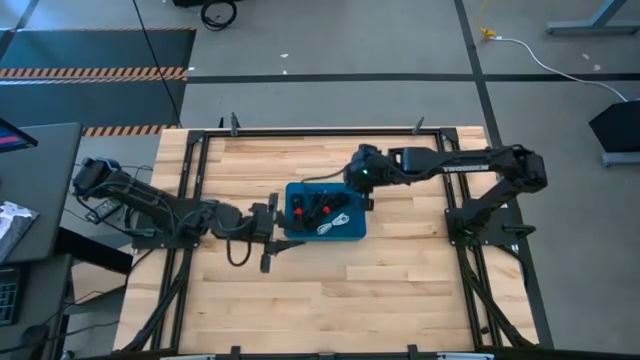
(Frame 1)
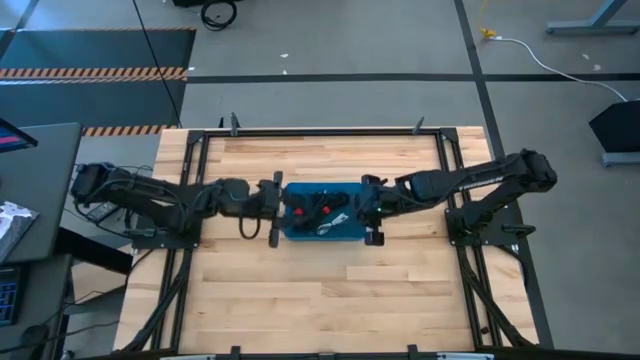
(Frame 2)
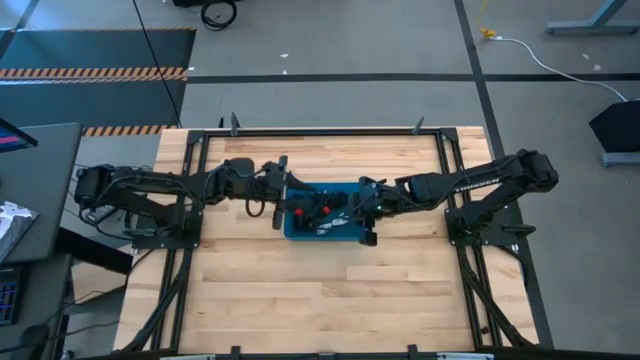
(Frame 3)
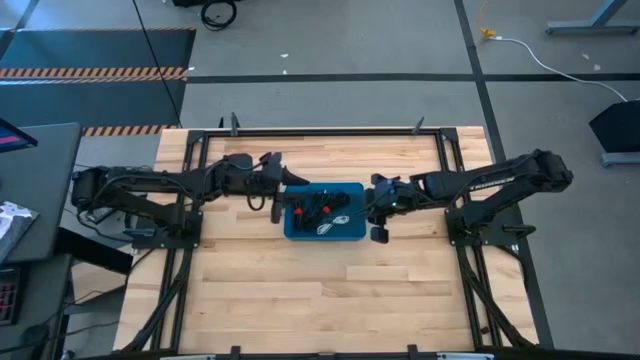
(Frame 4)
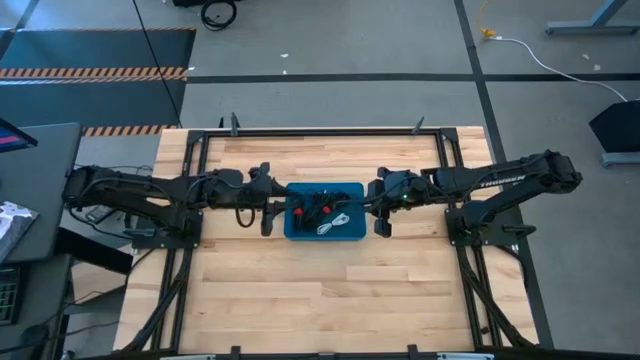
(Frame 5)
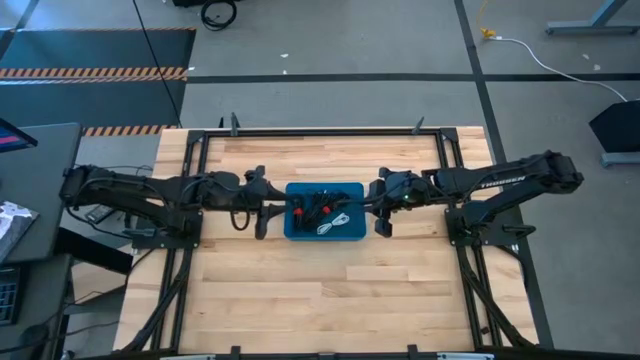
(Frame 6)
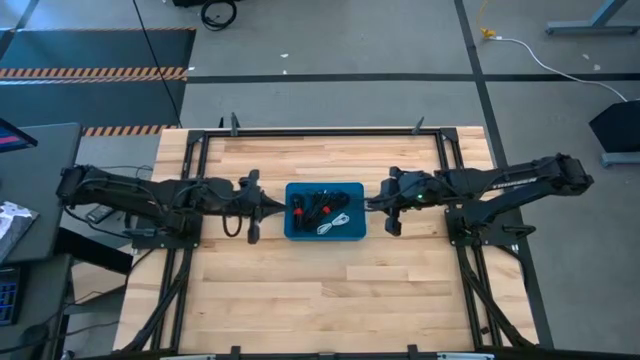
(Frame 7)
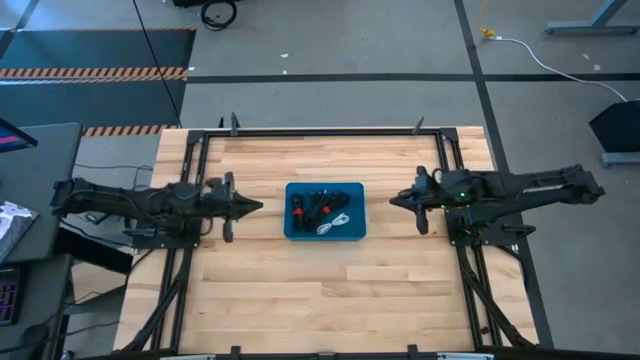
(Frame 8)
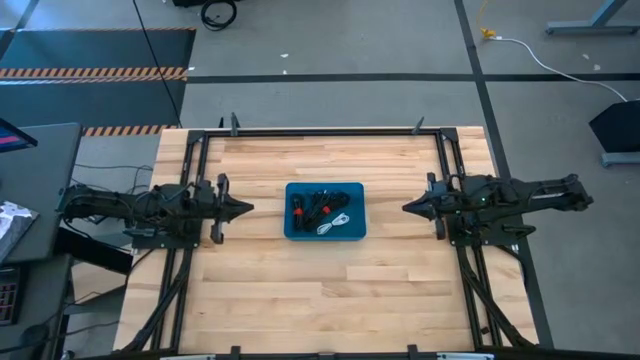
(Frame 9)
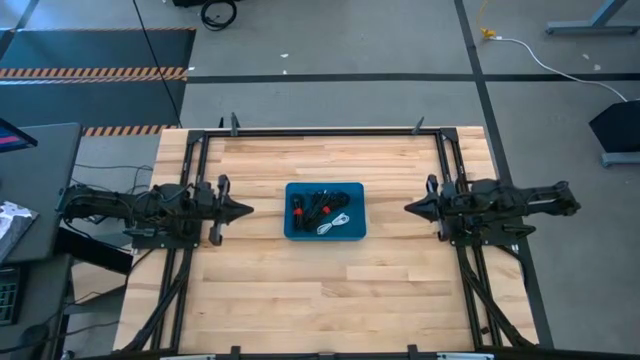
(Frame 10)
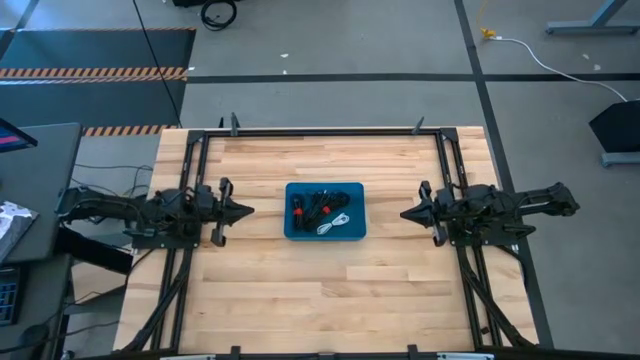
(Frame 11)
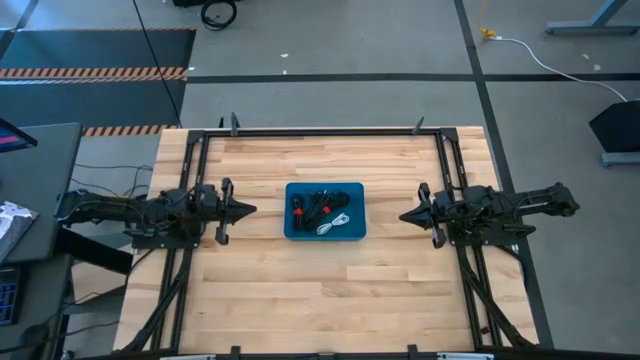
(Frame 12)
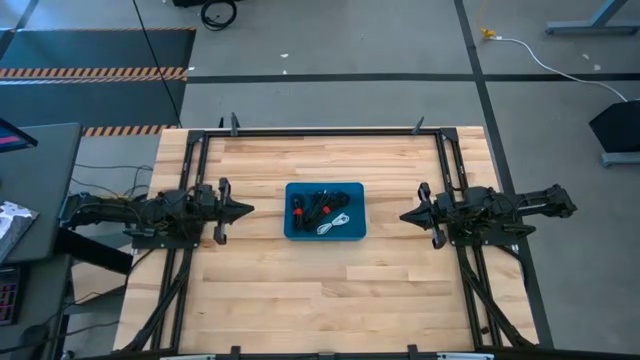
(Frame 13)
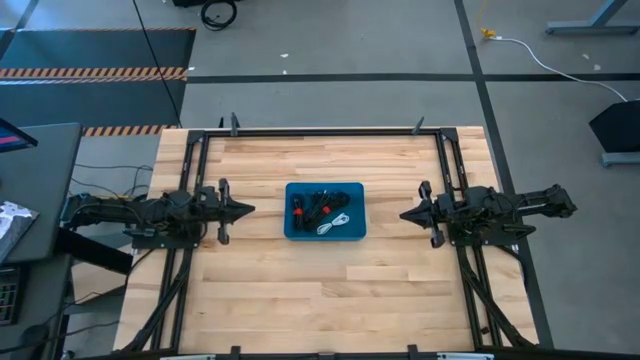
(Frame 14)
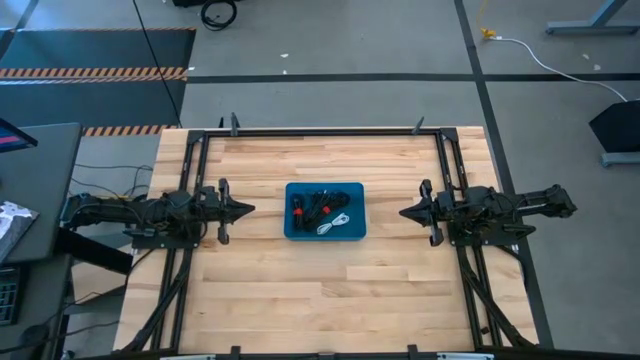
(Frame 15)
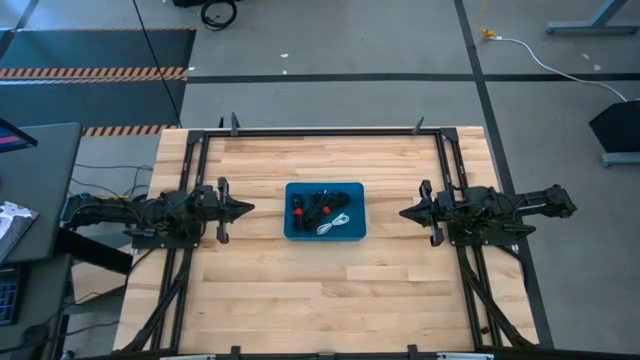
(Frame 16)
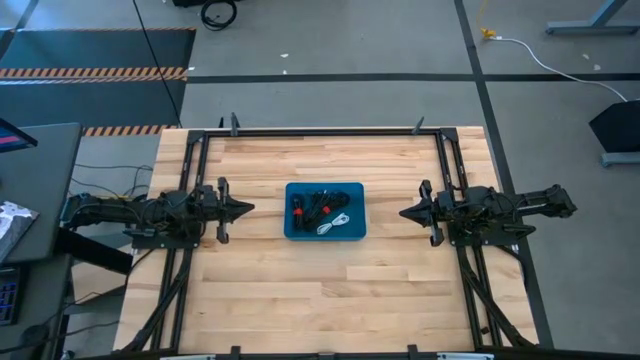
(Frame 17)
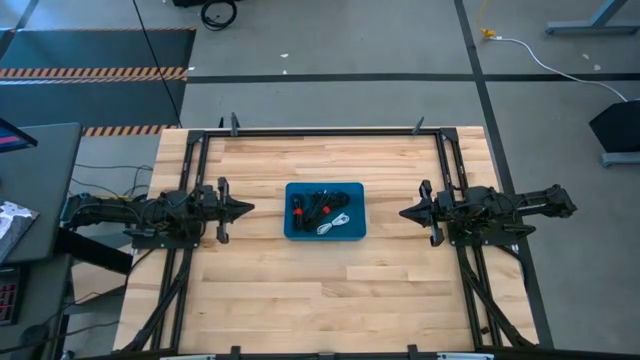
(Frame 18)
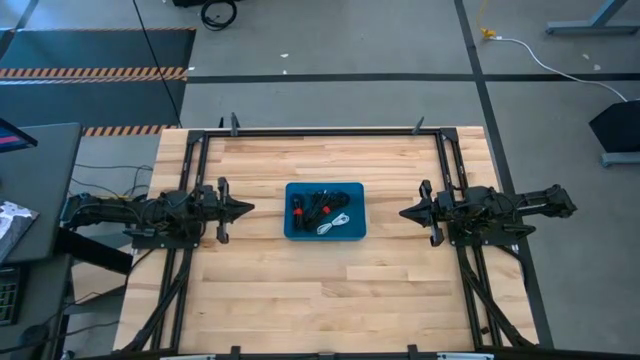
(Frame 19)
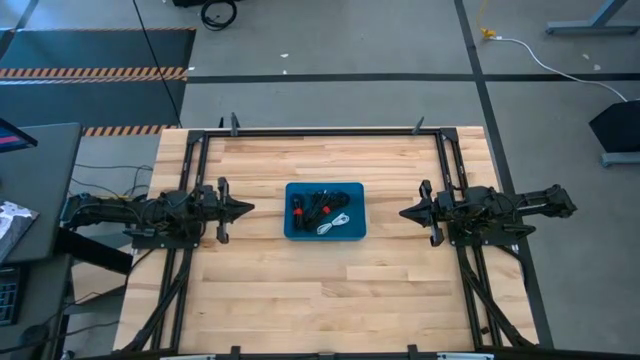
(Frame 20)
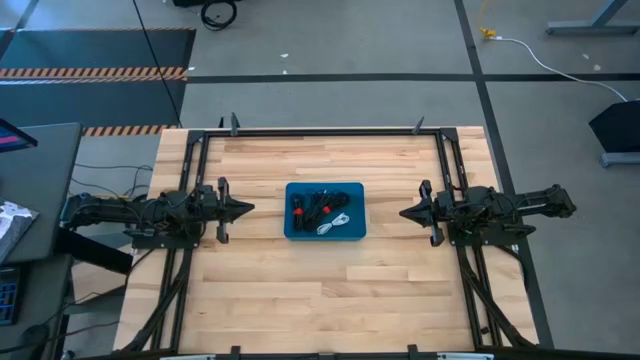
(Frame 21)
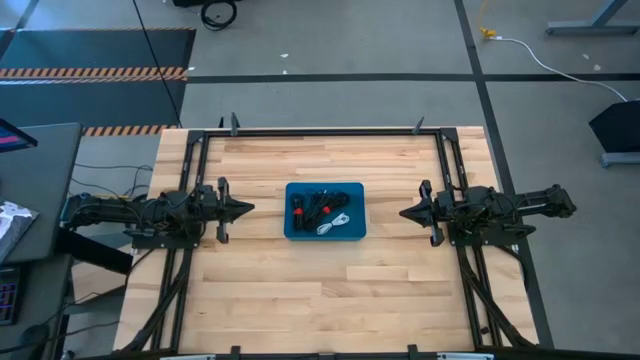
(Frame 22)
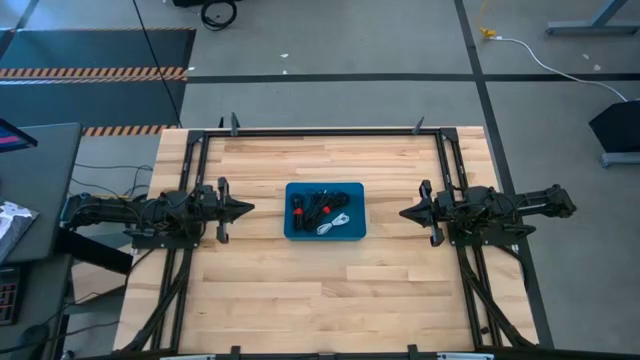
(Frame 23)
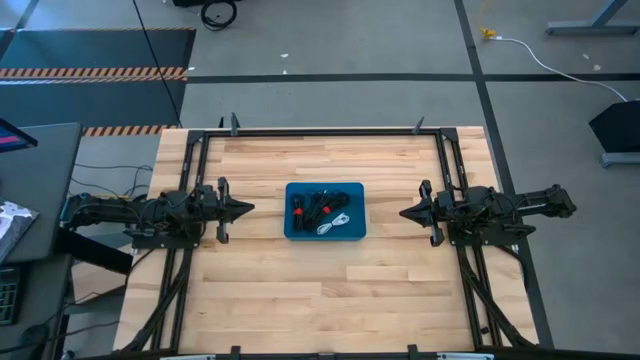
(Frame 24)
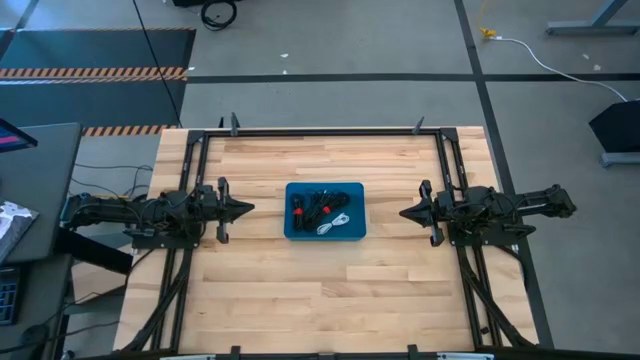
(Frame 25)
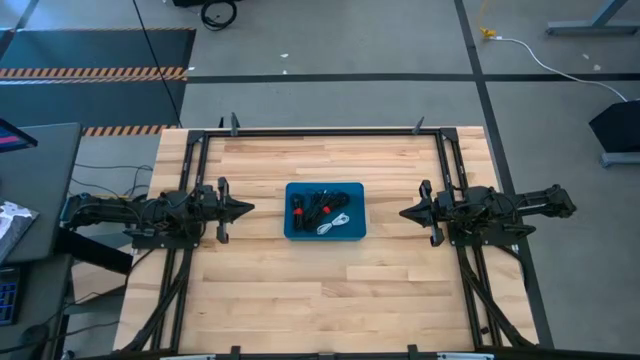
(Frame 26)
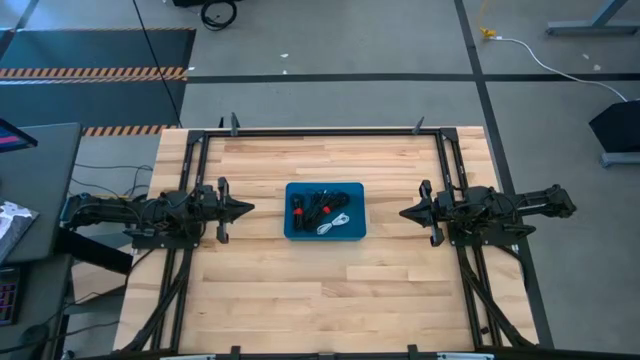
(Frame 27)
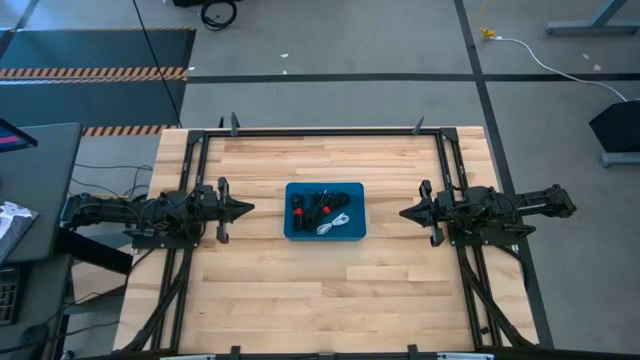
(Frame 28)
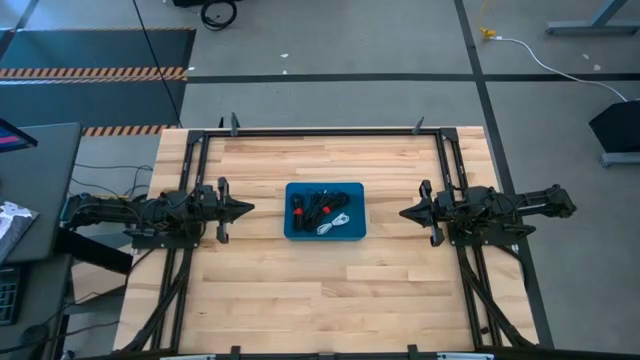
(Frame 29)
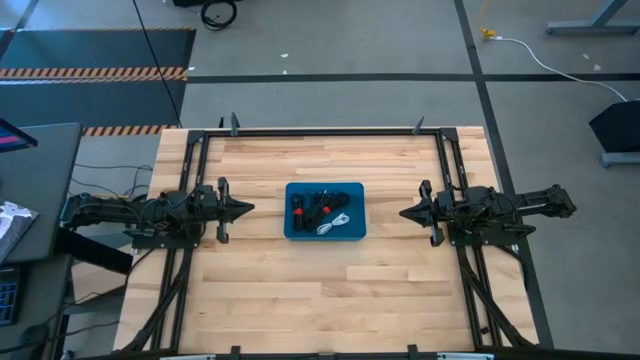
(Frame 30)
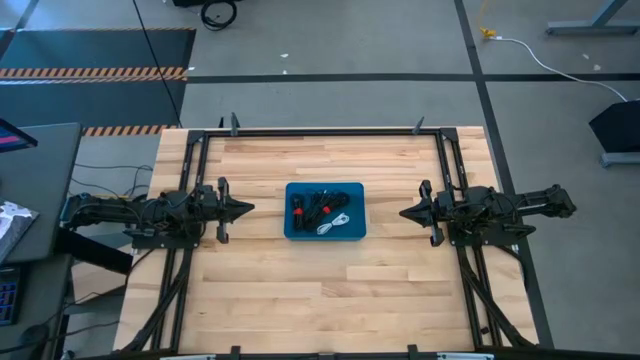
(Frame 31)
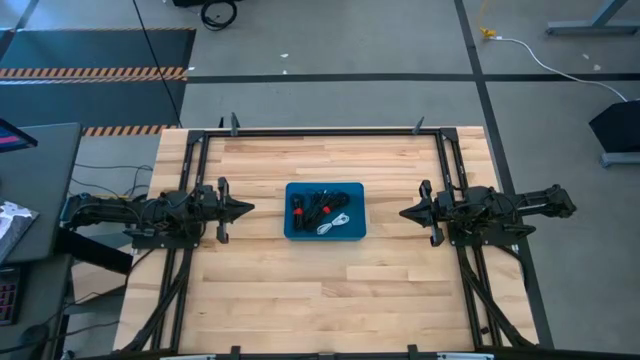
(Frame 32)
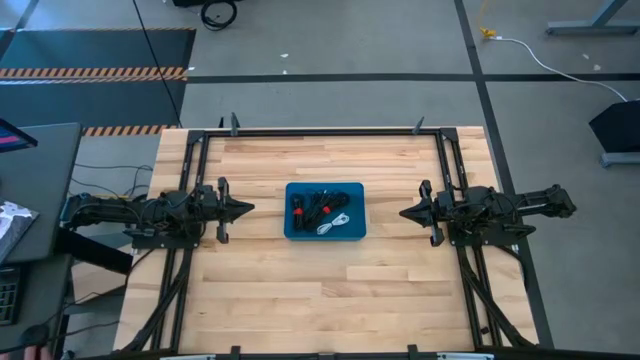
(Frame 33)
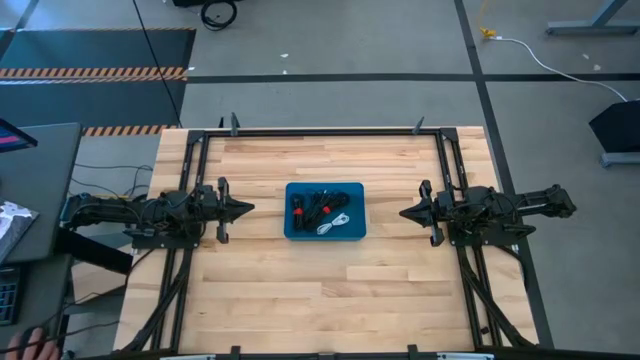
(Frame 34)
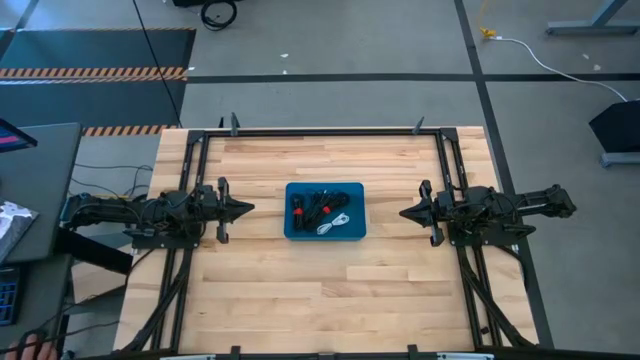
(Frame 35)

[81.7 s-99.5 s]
Task: Pick and place USB-C Cables
Return to Home Position

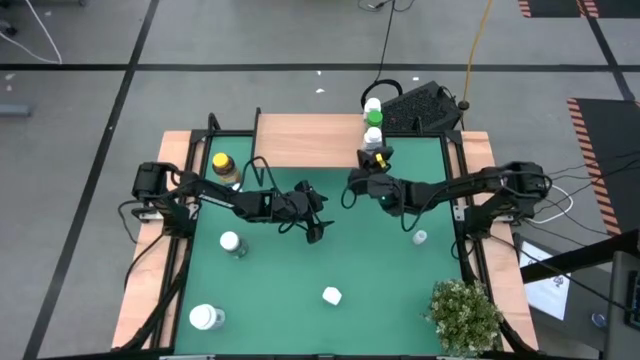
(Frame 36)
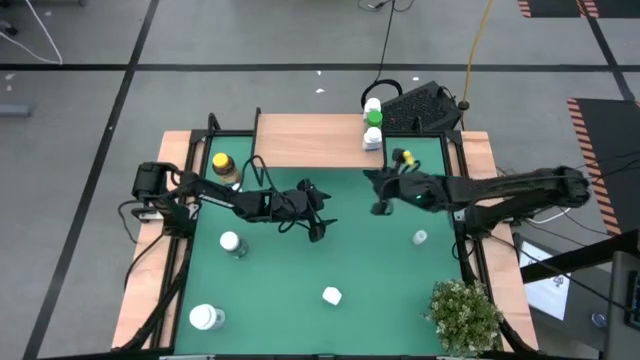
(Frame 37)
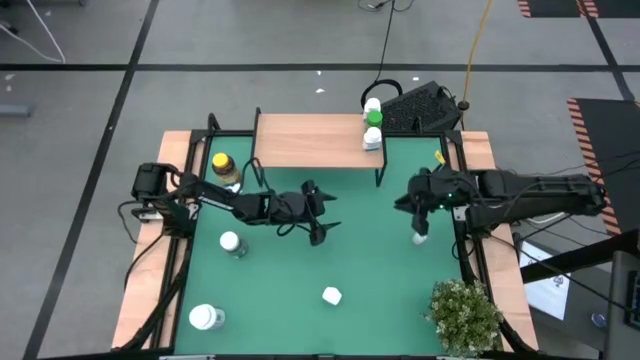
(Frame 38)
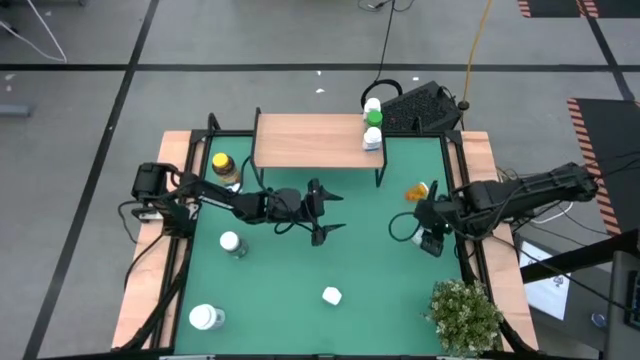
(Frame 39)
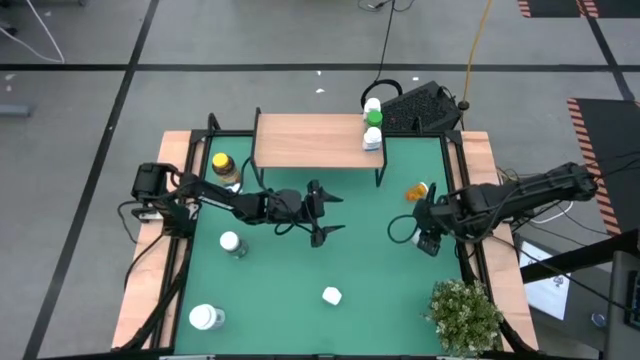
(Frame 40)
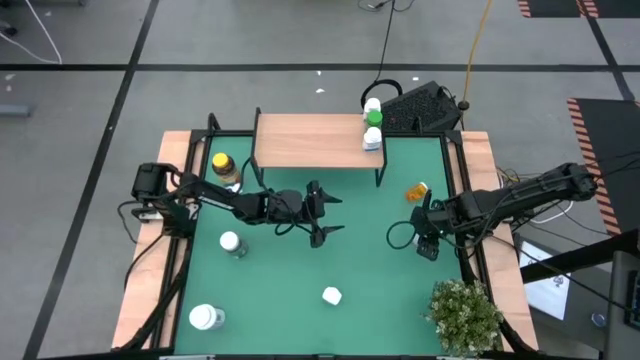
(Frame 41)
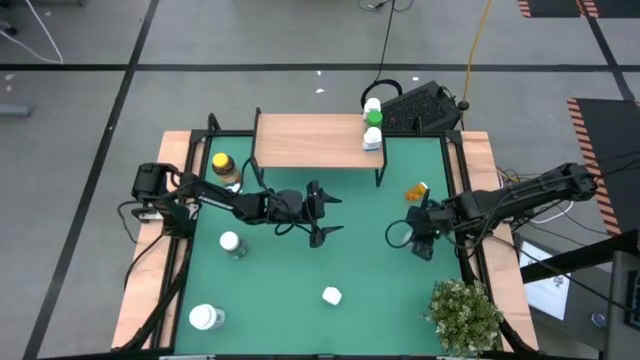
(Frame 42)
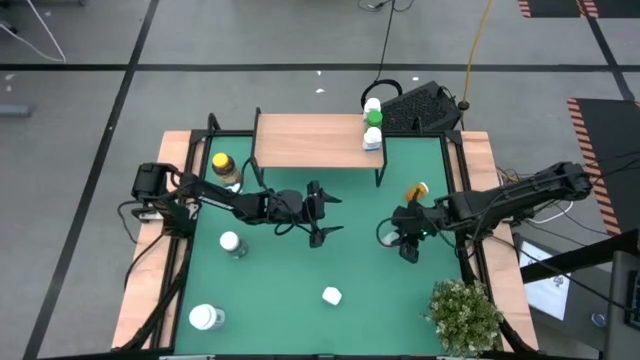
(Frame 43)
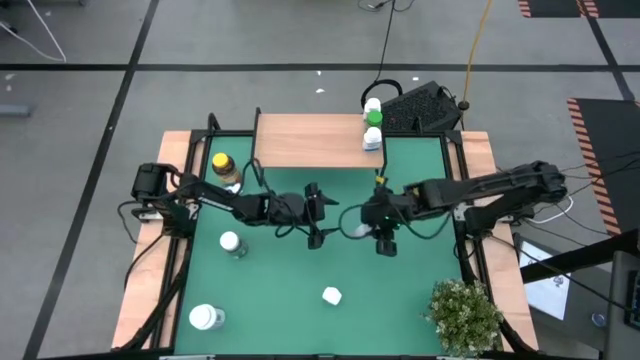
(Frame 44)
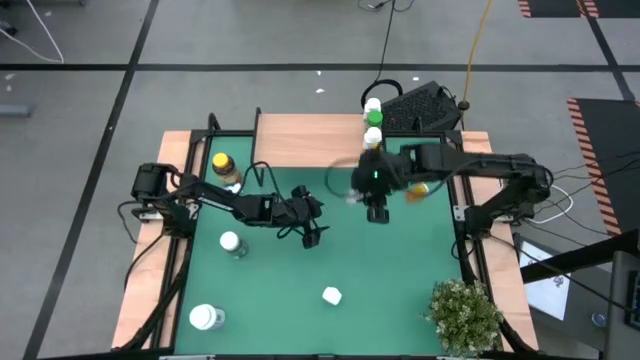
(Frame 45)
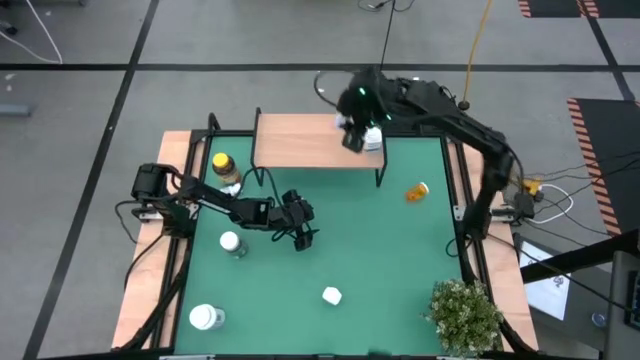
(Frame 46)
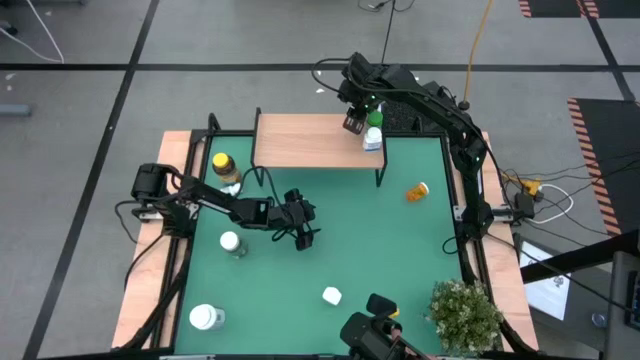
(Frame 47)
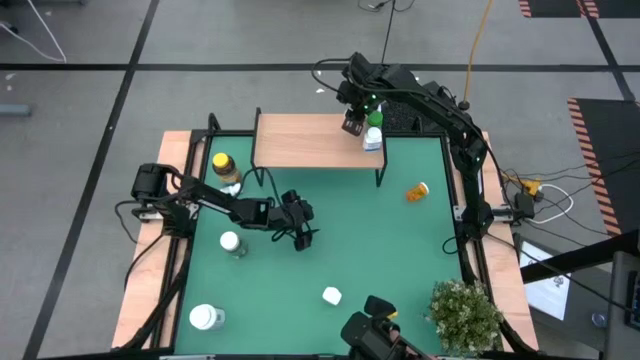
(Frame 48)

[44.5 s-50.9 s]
Task: Pick and place medicine bottles onto shelf by color
Put the pink pill bottle on the shelf
